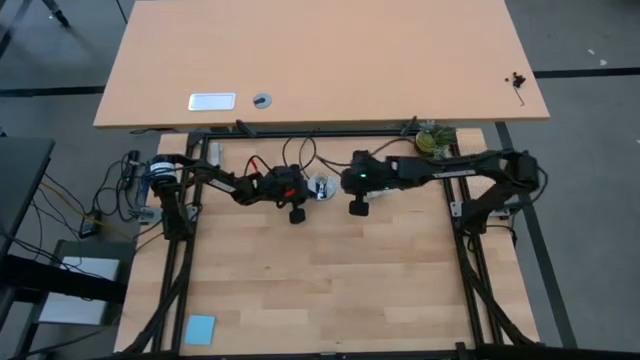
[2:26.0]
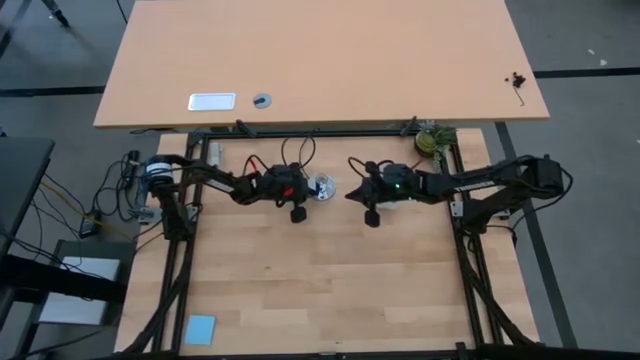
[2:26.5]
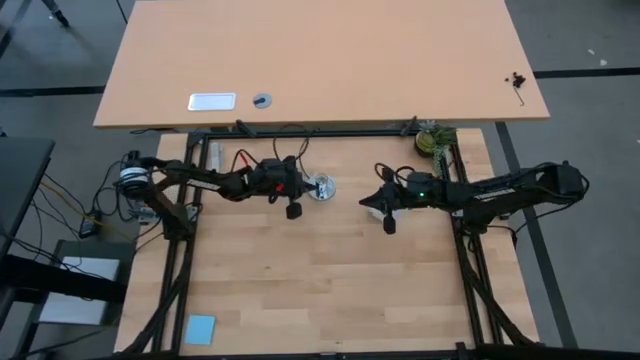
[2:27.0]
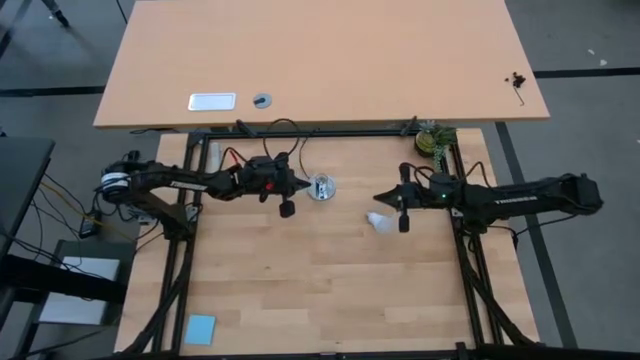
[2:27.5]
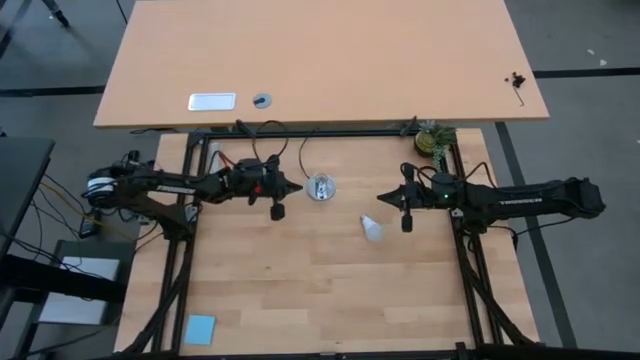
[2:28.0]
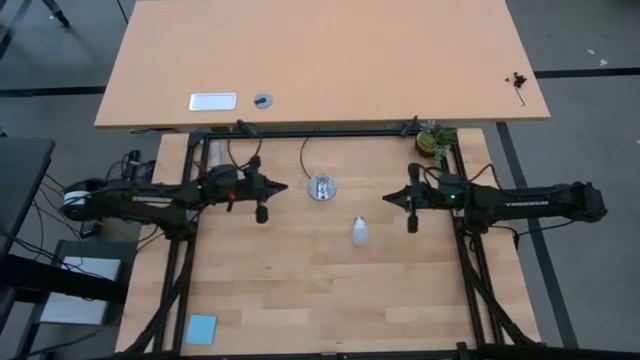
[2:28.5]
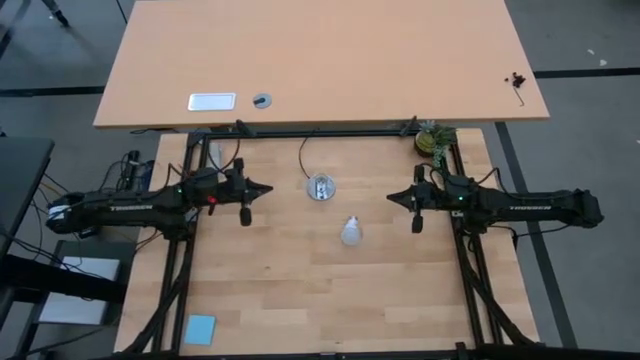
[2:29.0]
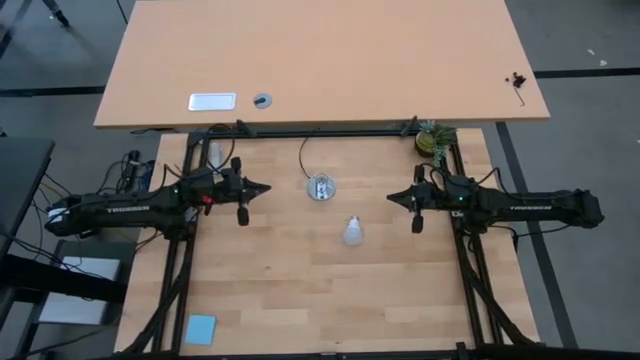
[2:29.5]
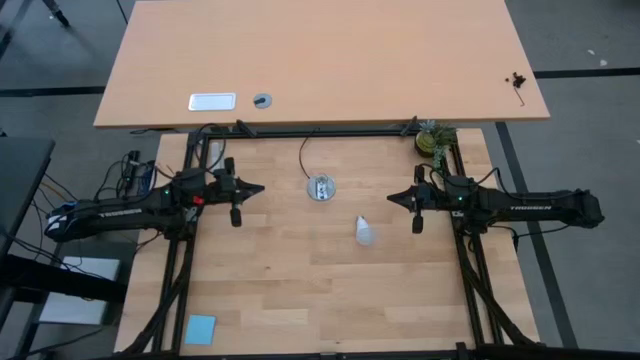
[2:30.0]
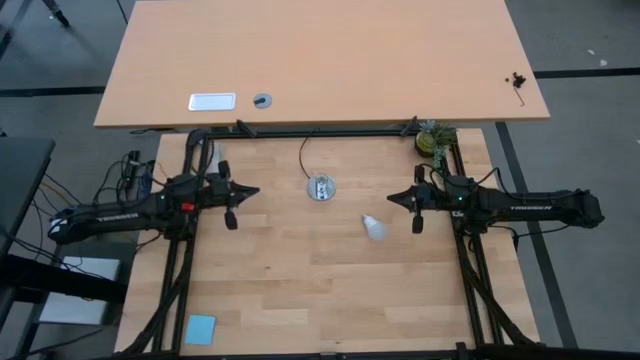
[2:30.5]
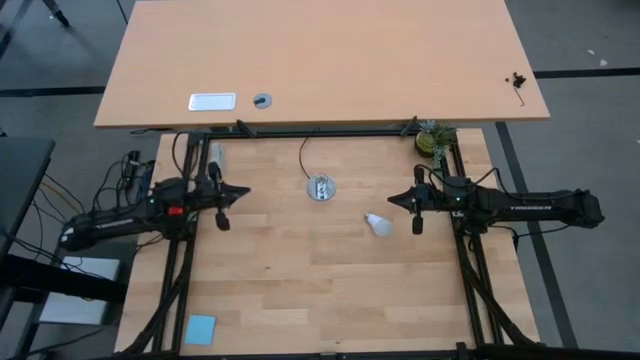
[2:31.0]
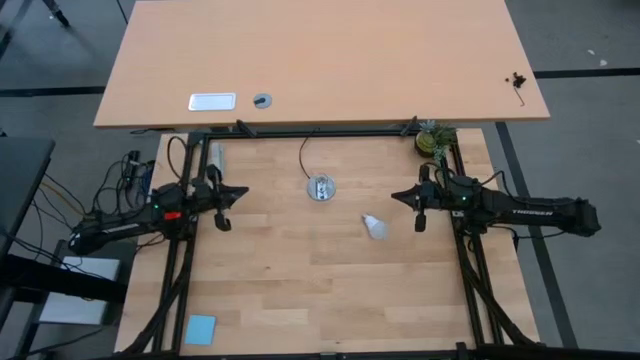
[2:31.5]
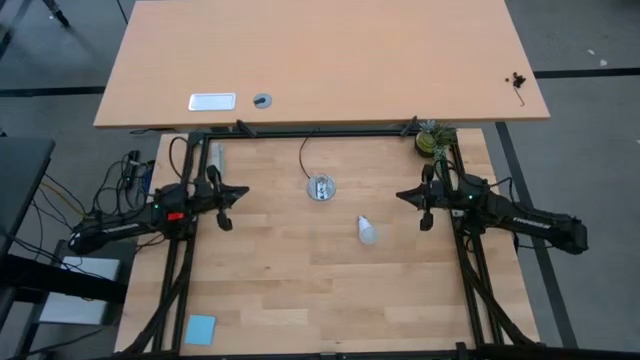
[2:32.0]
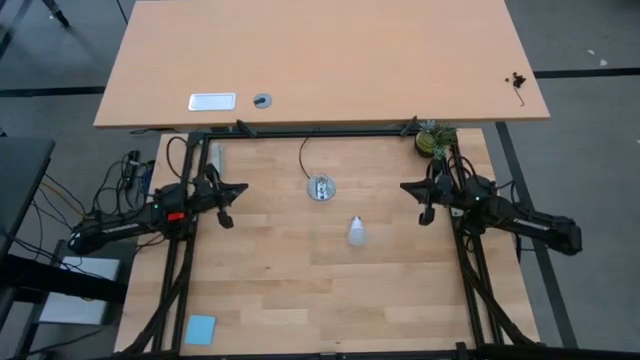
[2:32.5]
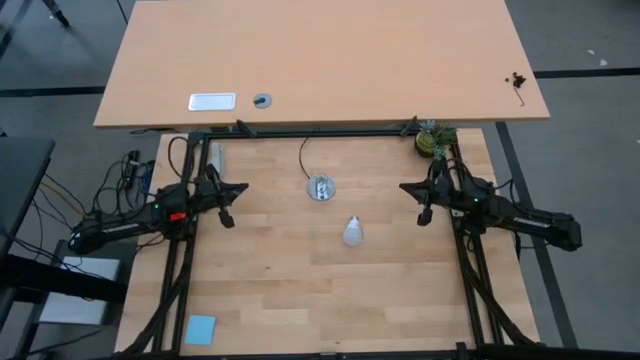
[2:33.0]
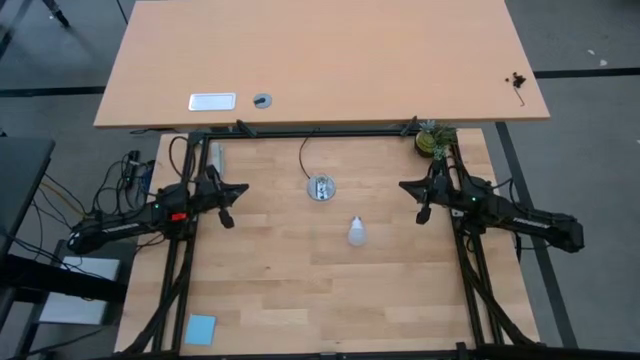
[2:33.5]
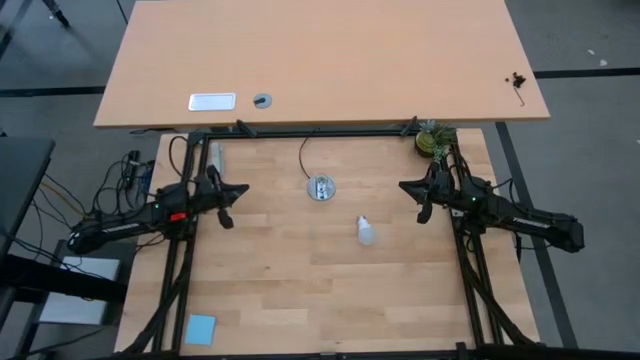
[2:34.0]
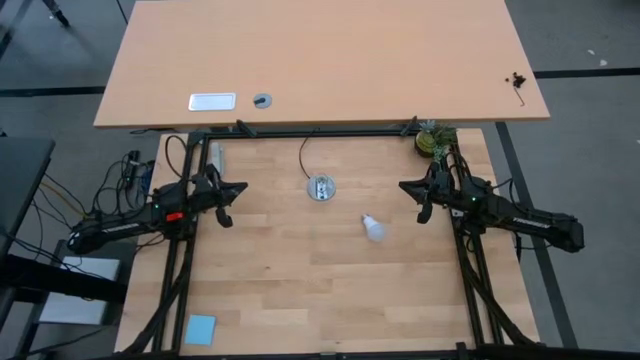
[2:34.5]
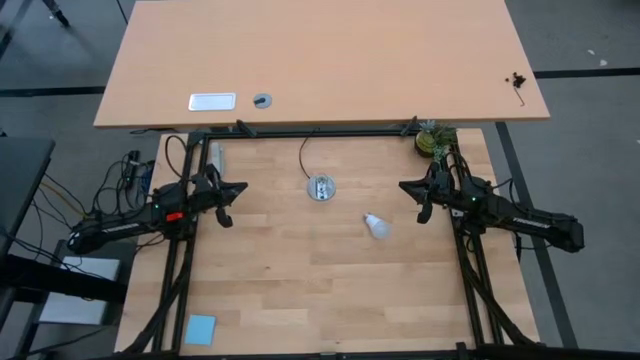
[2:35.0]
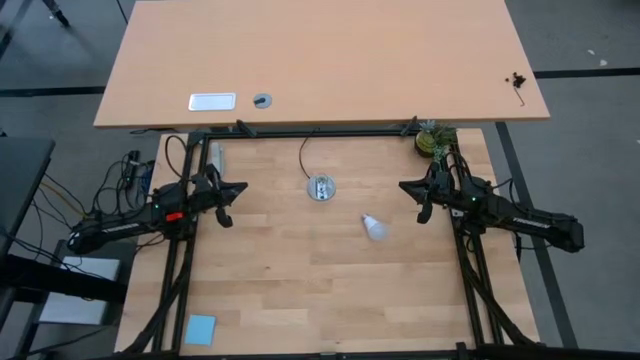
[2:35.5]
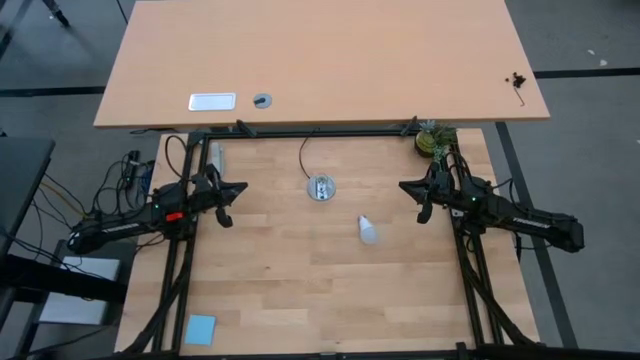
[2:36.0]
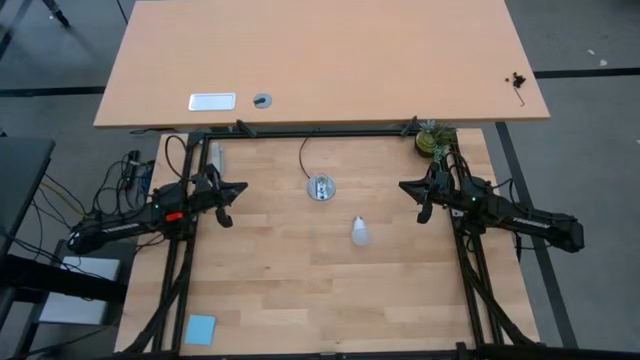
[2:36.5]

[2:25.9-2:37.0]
Task: Screw lightbulb
Return to Home Position

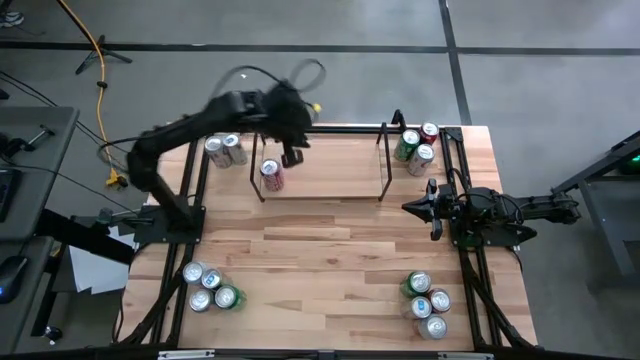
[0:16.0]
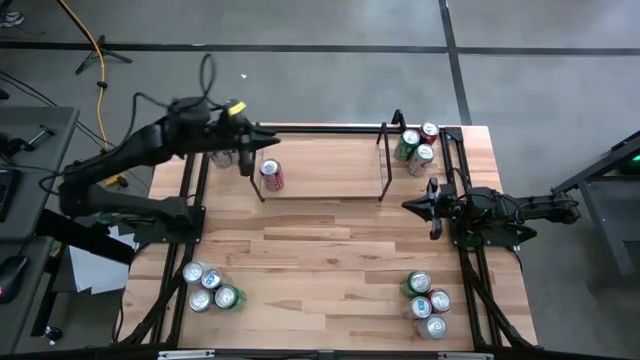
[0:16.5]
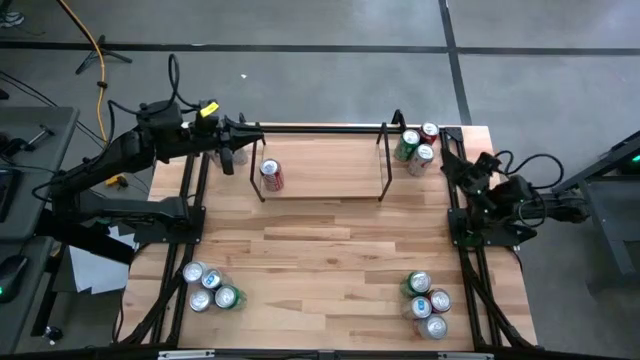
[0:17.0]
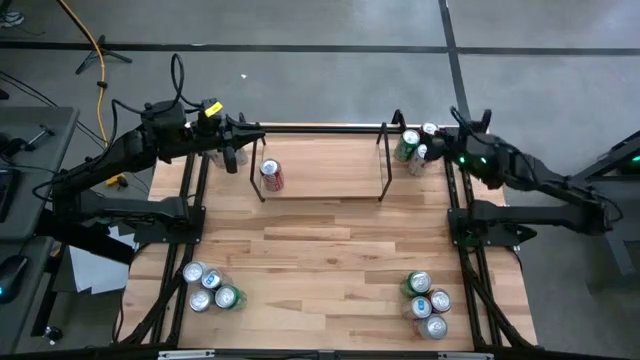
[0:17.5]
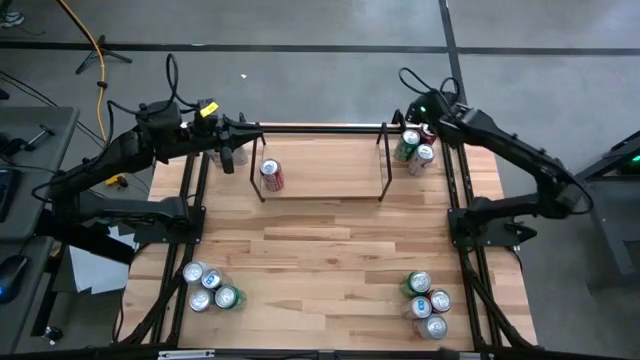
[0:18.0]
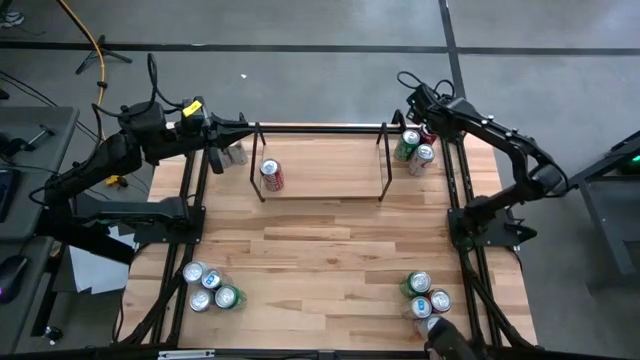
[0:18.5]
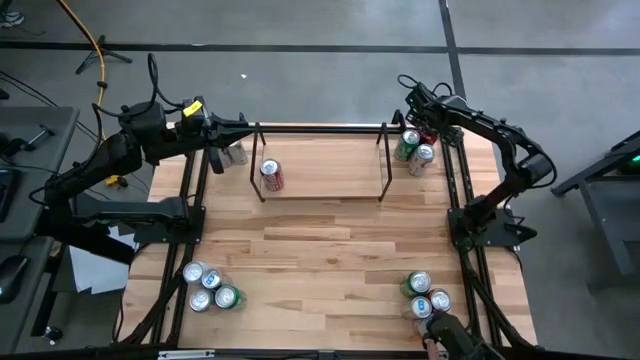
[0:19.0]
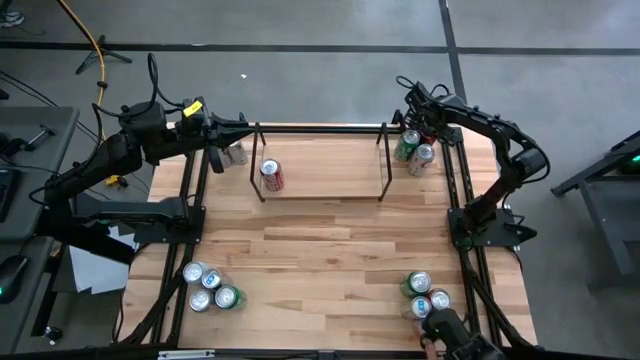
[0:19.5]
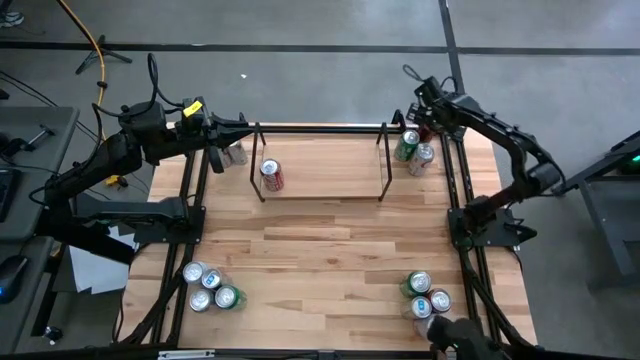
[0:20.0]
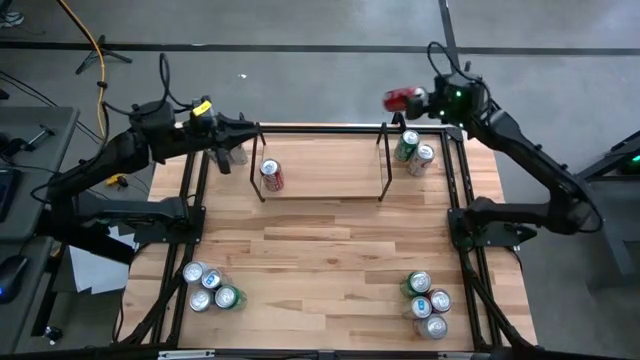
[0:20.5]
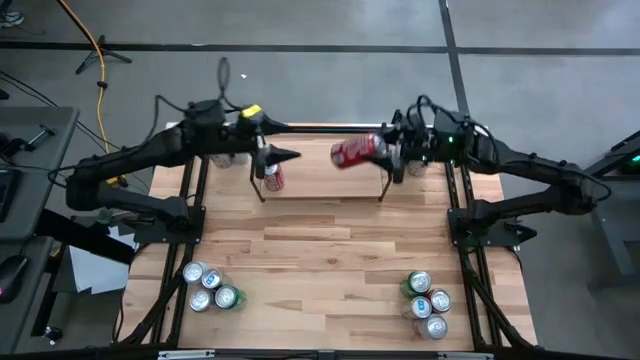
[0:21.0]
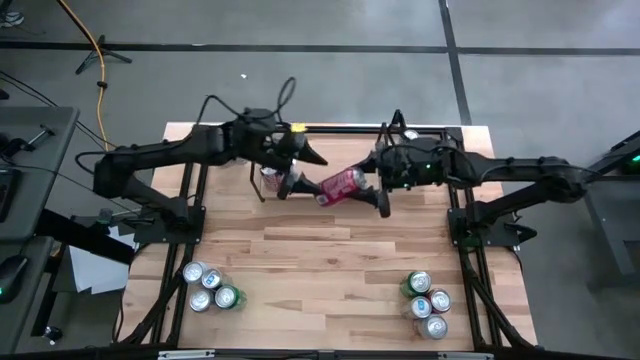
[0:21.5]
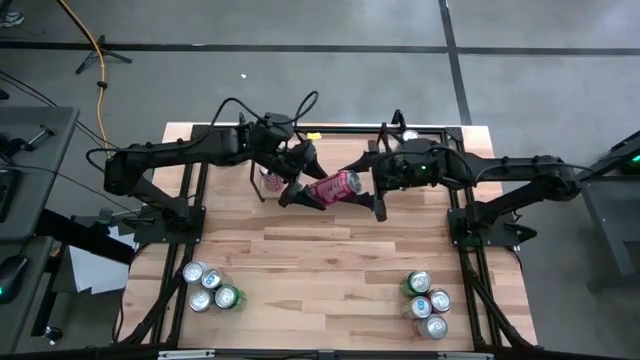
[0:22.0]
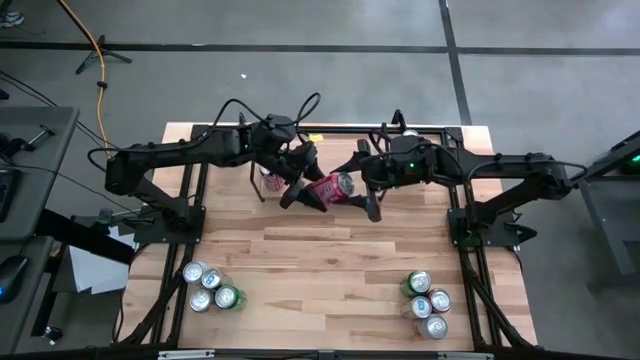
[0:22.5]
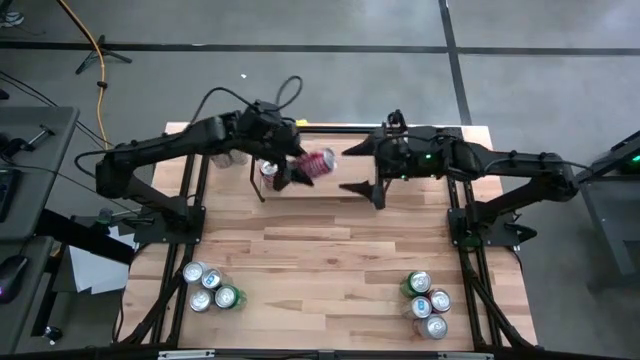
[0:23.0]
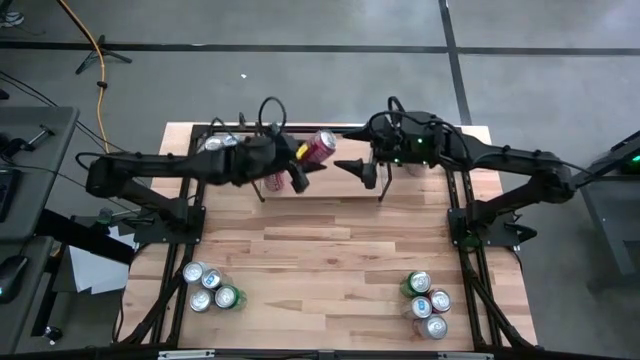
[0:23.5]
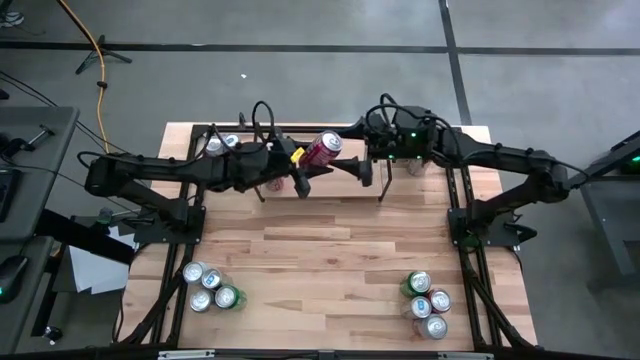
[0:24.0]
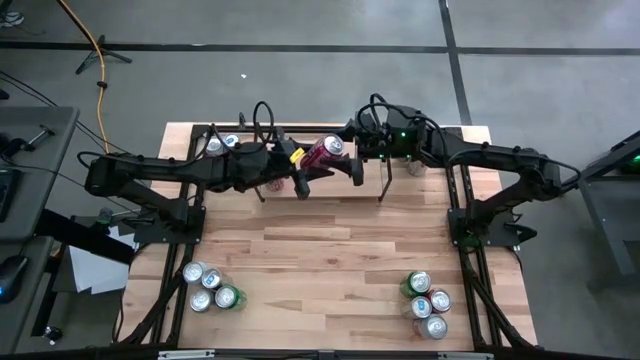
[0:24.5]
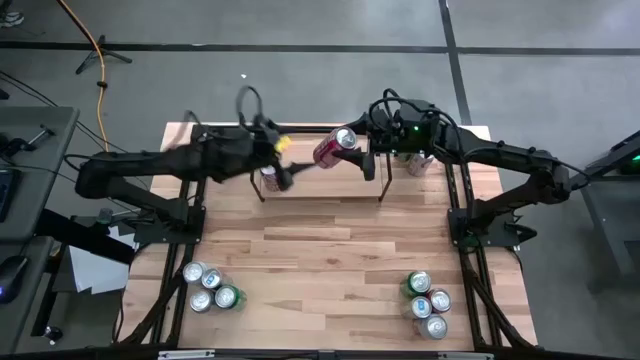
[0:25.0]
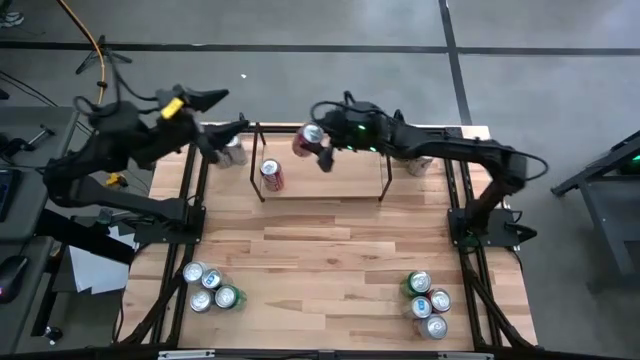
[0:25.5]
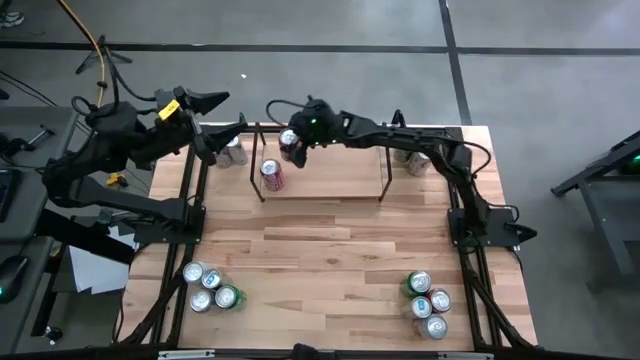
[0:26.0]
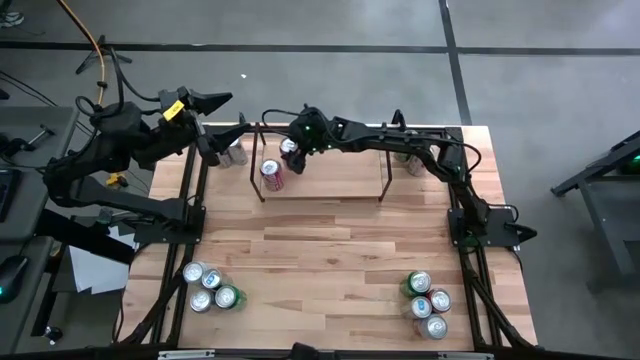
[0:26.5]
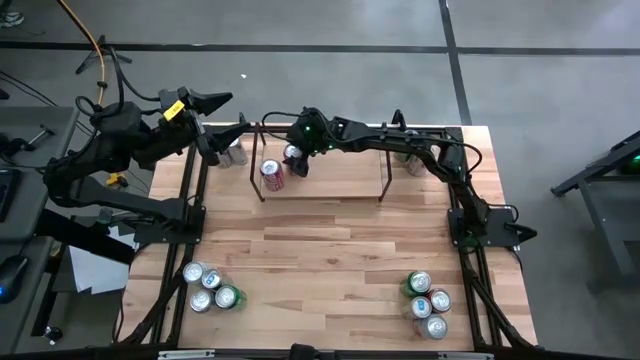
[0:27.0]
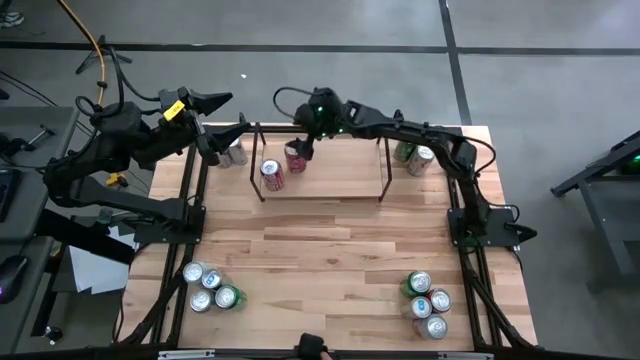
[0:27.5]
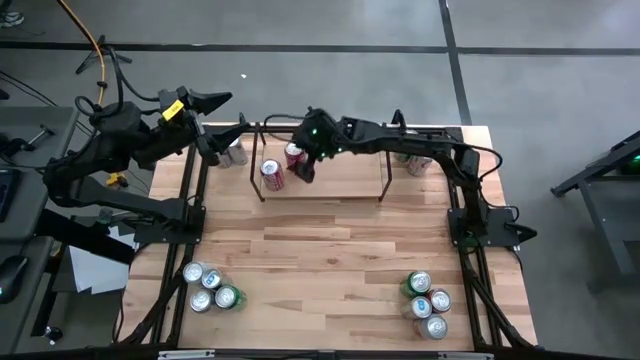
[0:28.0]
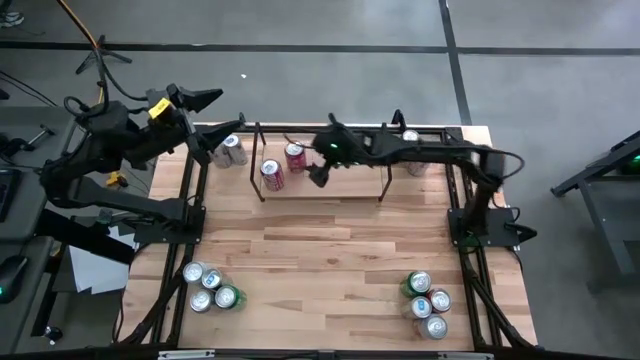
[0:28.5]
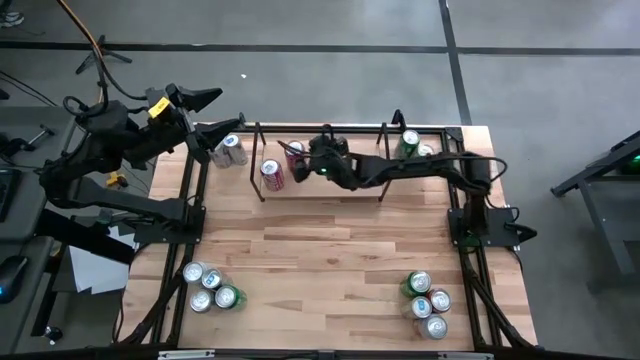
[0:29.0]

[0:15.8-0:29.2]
Task: Place canned beverage on shelf
Put the top red soda can on the shelf aligned with the other red soda can
